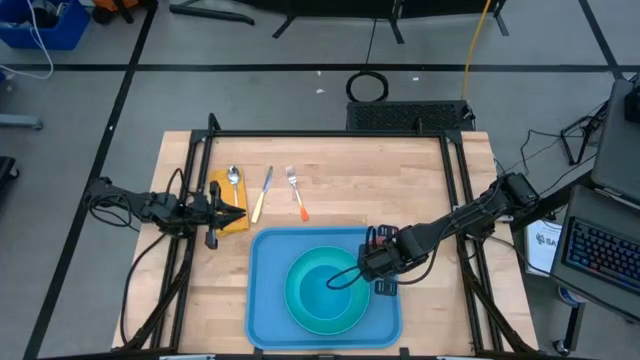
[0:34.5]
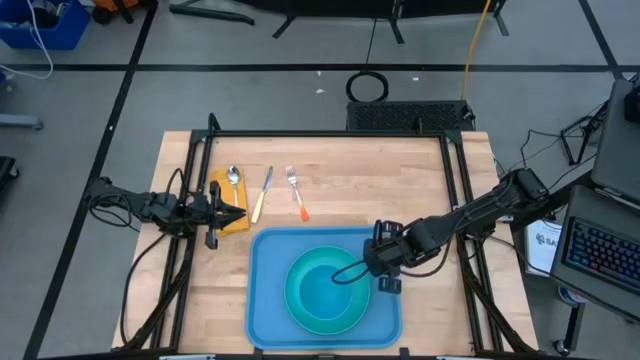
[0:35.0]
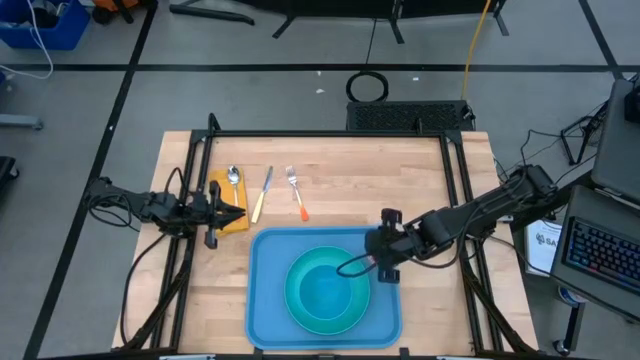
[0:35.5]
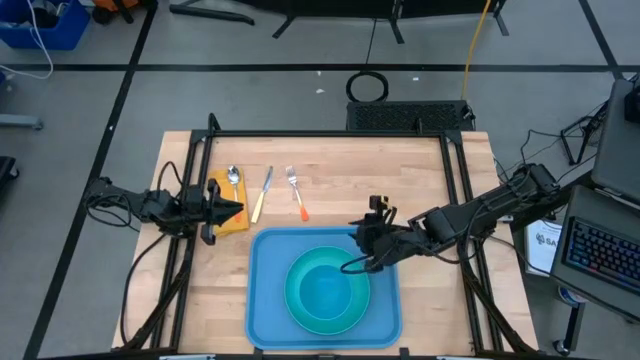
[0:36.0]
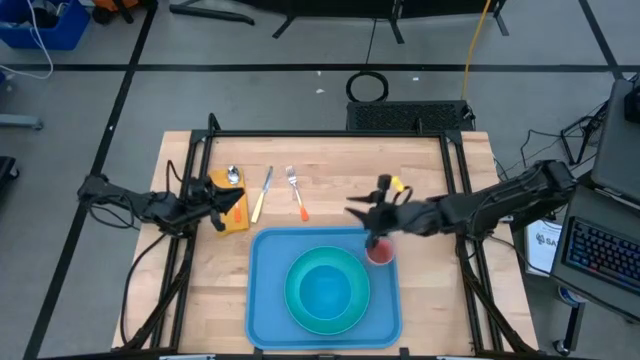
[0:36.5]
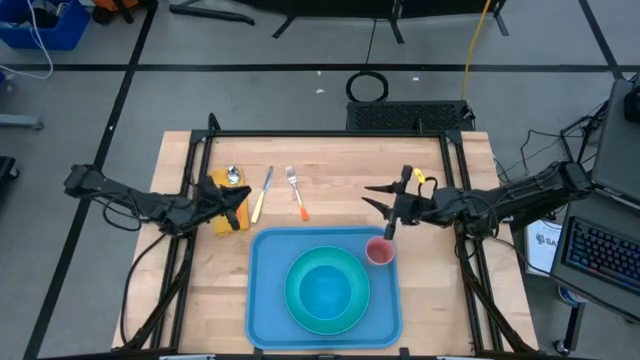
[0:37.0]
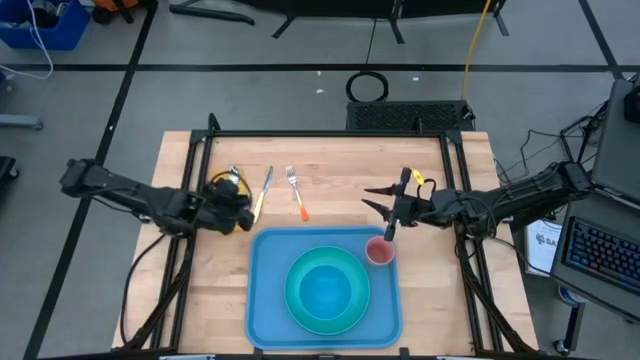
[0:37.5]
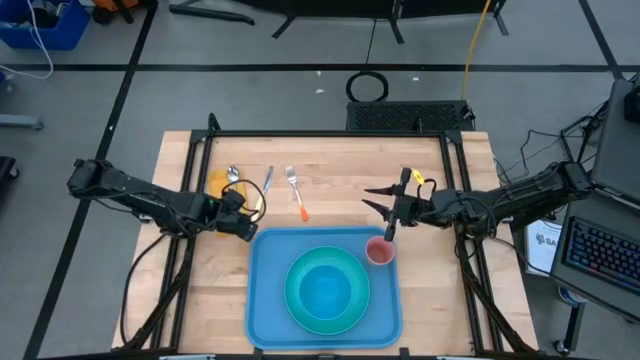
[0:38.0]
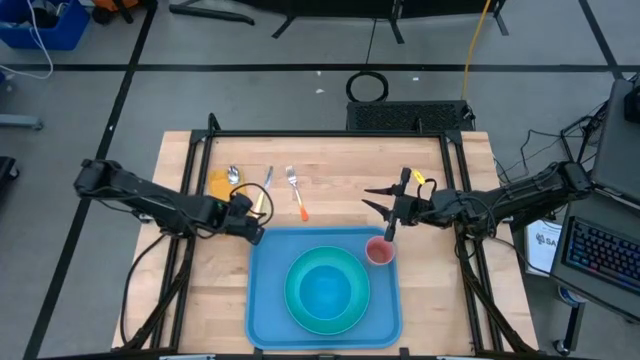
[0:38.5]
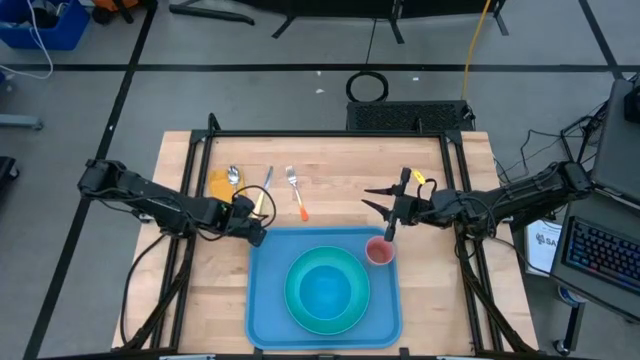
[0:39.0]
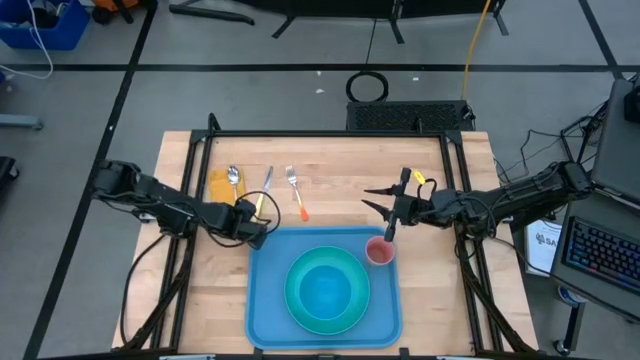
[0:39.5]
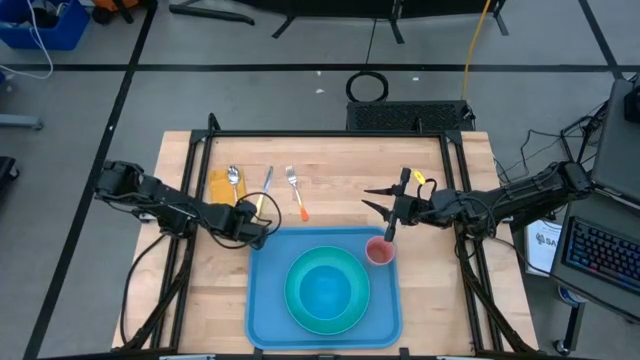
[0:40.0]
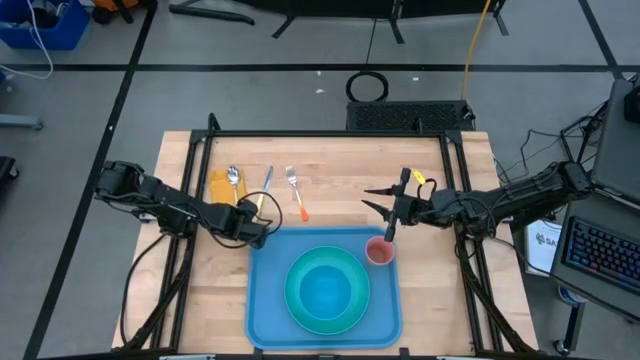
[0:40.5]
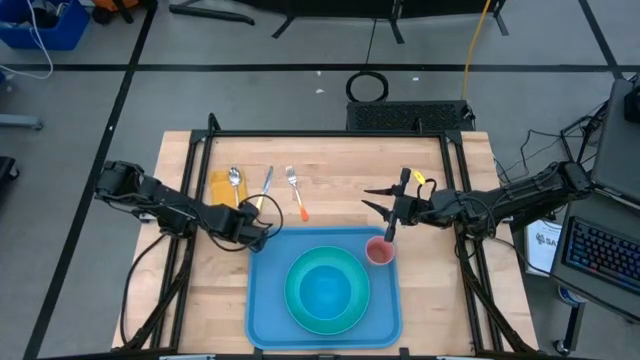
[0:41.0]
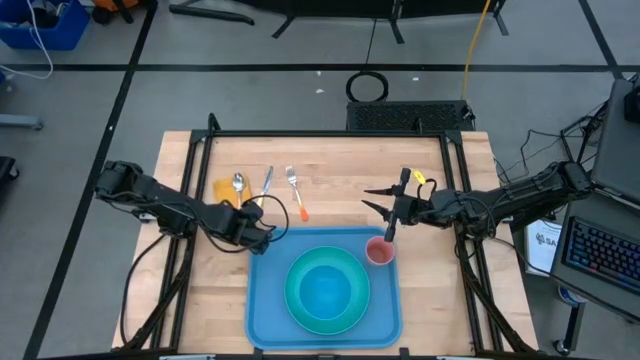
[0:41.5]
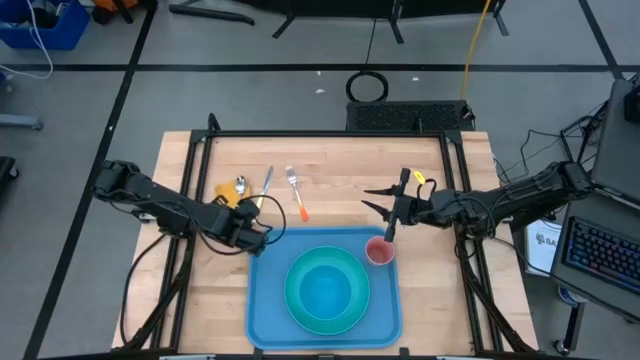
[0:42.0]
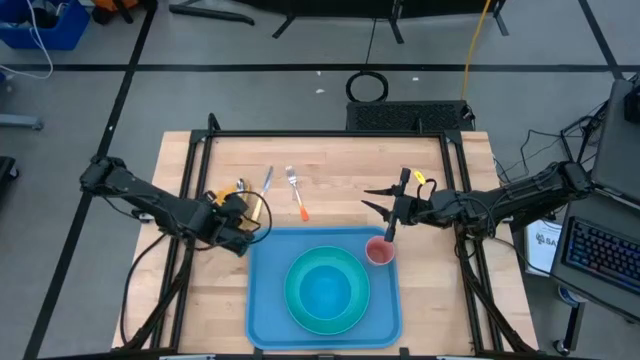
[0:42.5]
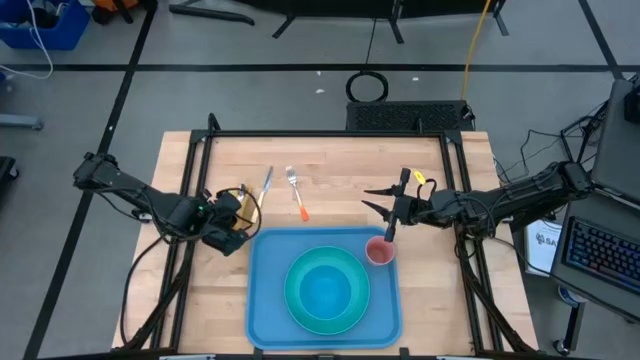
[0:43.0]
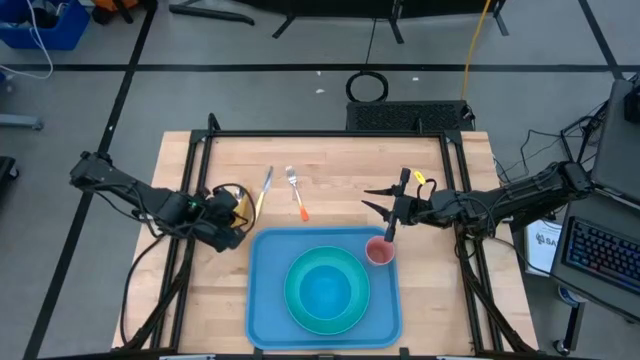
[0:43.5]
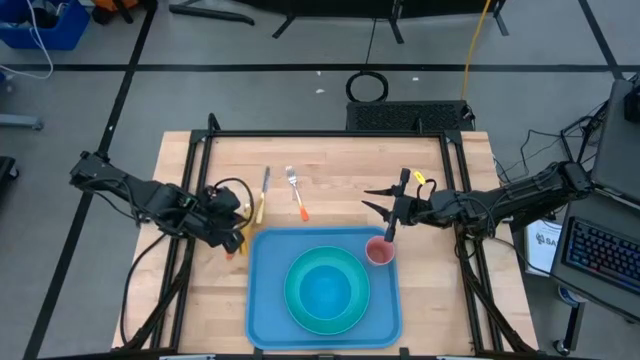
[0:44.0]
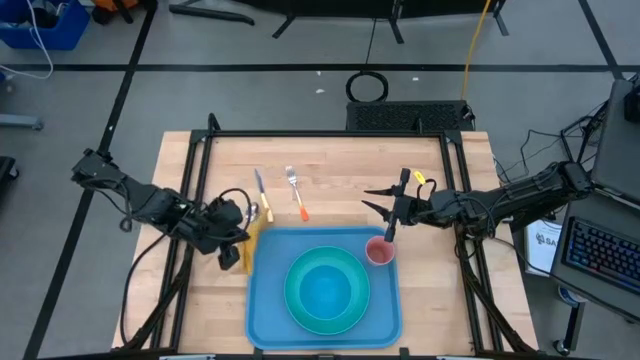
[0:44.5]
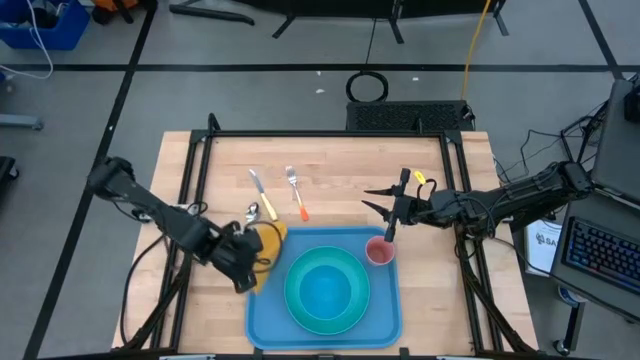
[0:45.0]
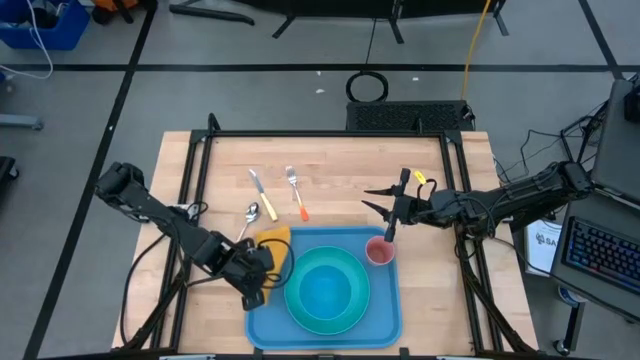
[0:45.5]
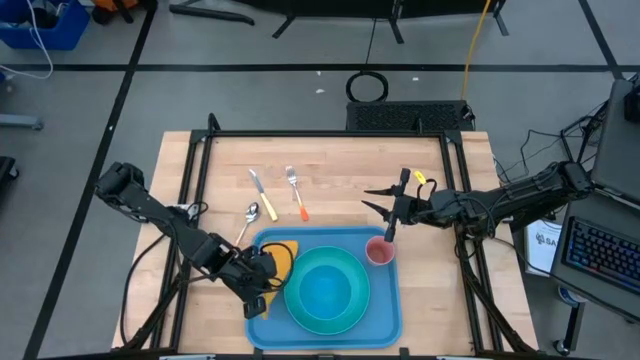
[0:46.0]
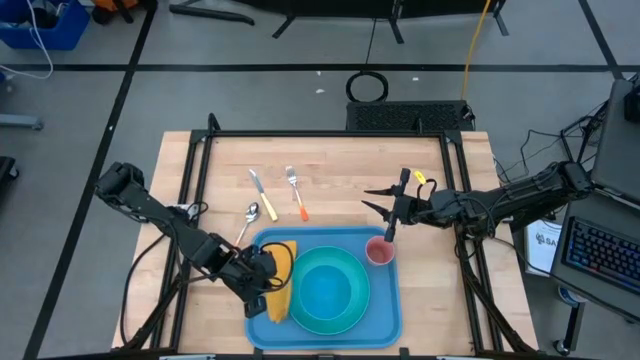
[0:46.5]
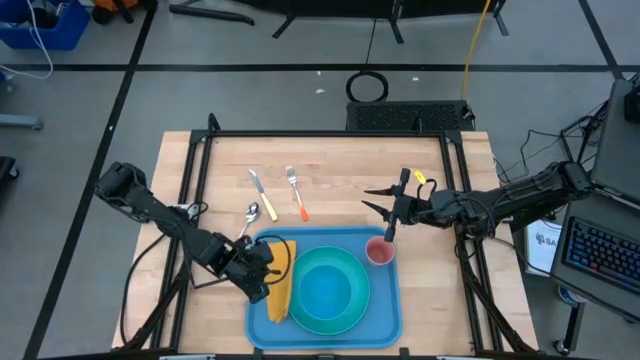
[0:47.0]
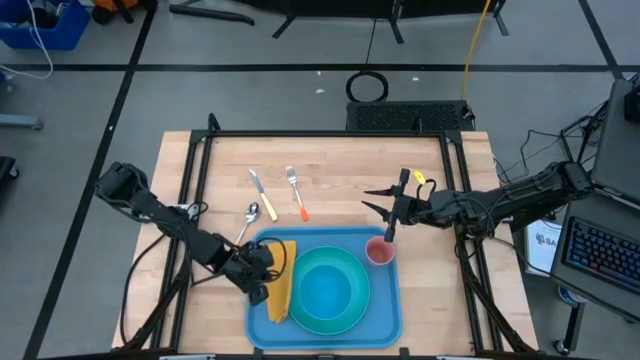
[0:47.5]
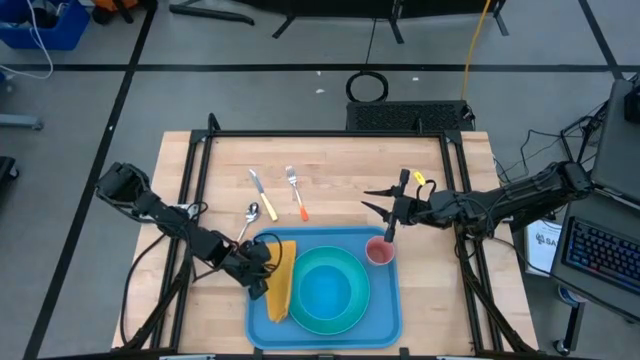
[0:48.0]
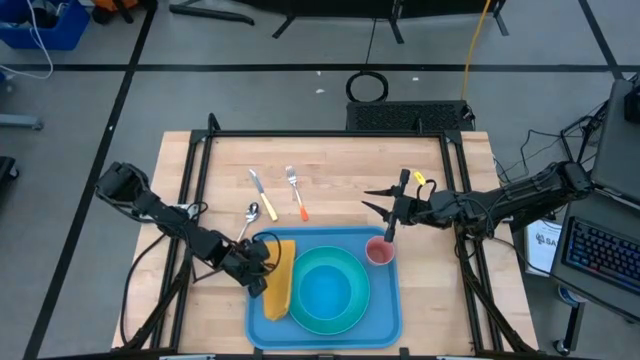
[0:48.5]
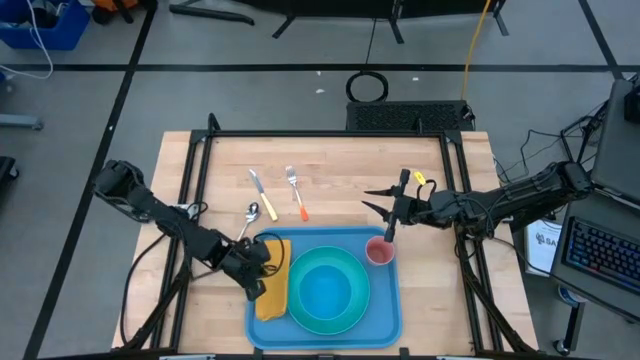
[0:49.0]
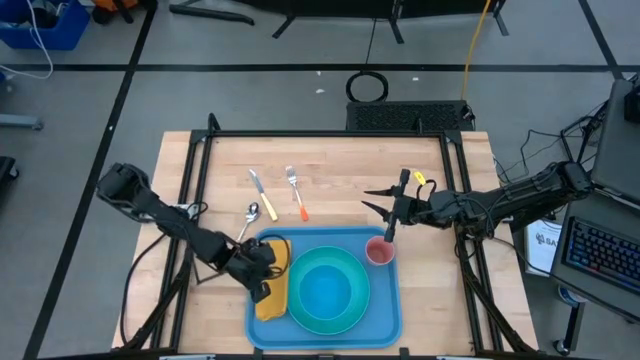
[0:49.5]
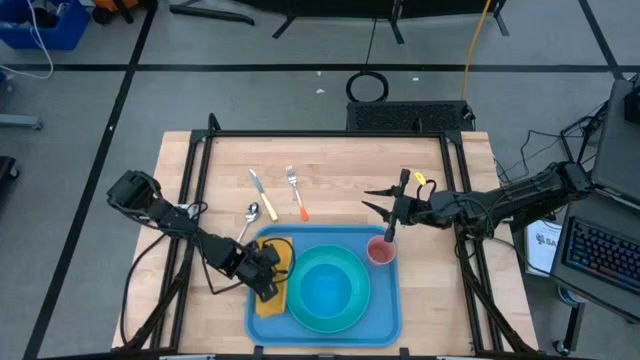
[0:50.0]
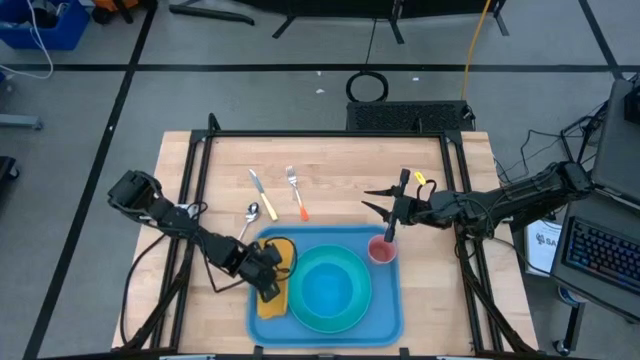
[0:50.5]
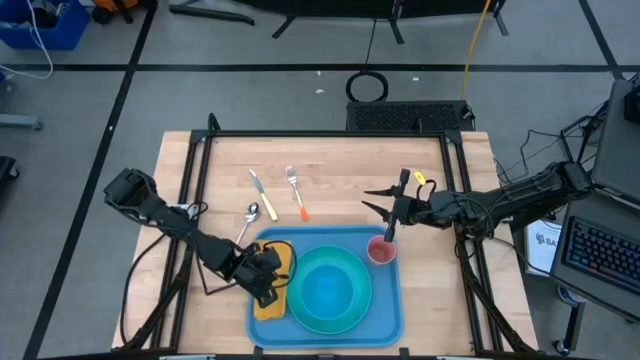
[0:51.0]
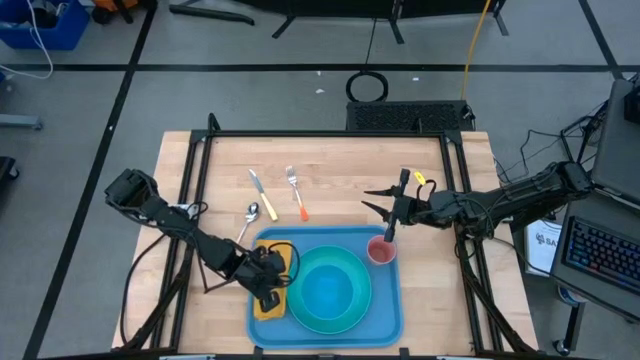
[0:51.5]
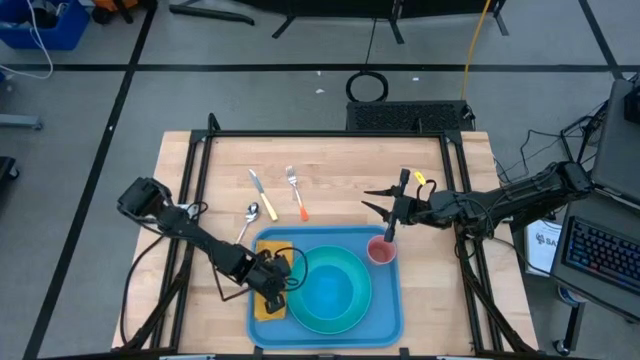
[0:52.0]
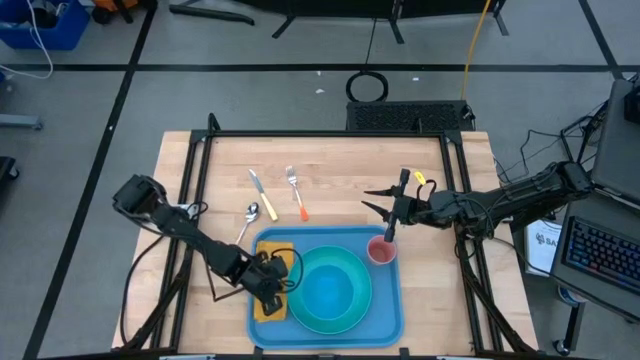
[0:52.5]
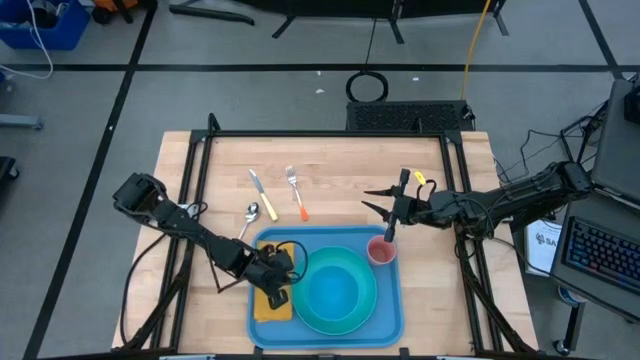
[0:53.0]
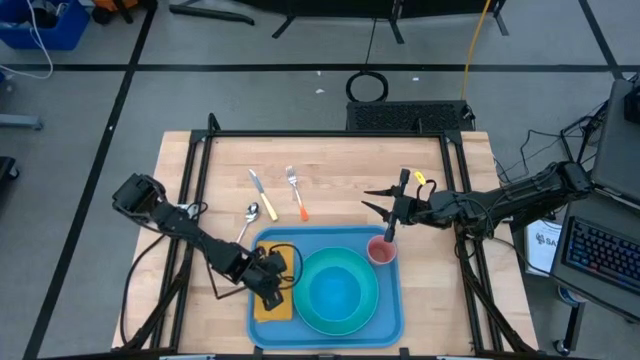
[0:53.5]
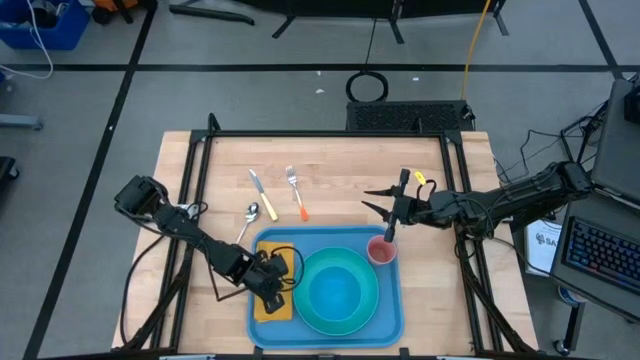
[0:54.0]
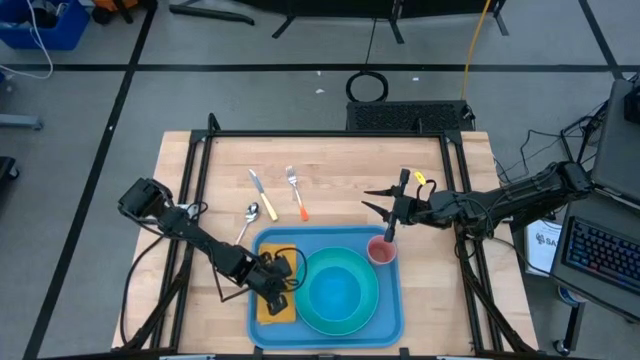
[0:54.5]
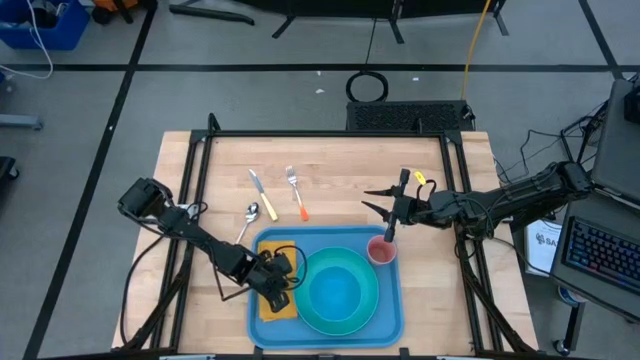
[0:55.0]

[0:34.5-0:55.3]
Task: Set up tray
Put the yellow napkin to the left of the blue plate

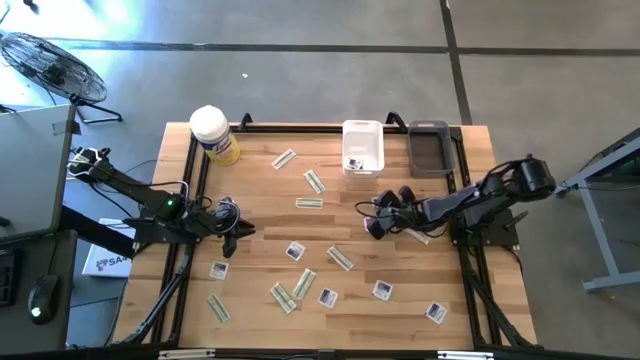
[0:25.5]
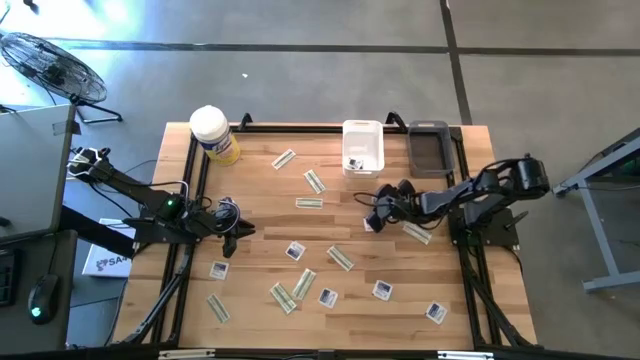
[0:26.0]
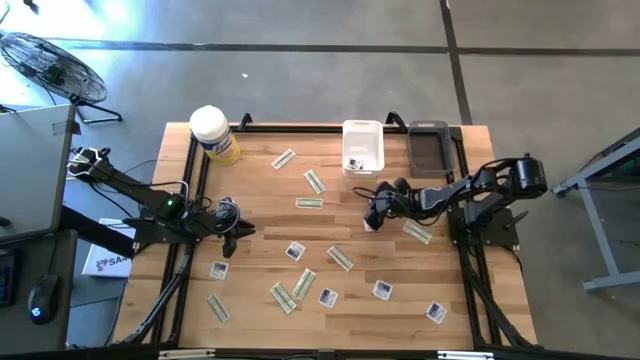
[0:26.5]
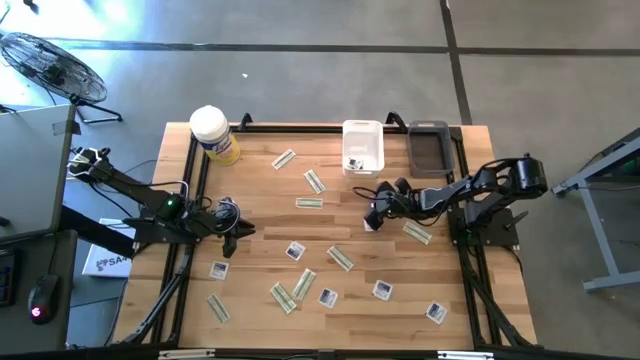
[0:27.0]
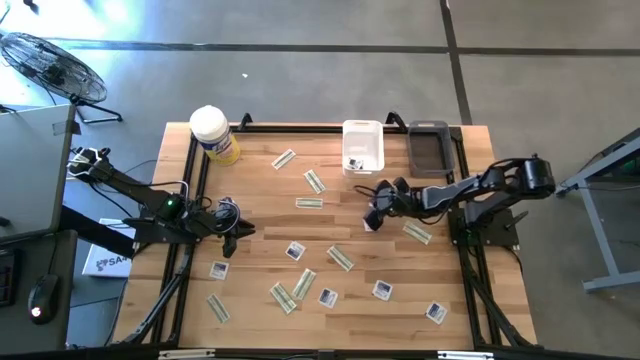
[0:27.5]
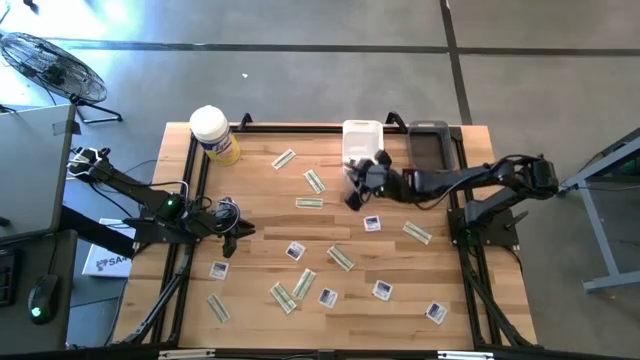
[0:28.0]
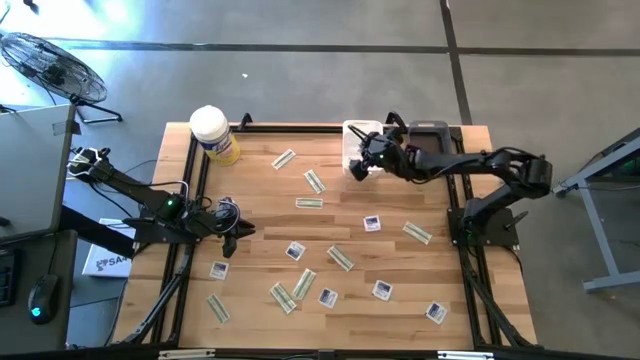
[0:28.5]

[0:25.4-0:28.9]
Task: Pick & Place First Aid Supplies
Put the blue alcohol pad into the white bin
